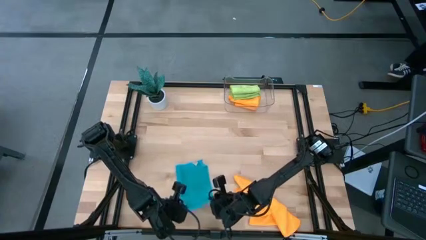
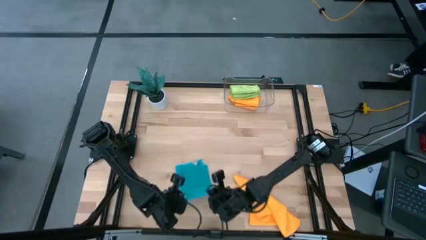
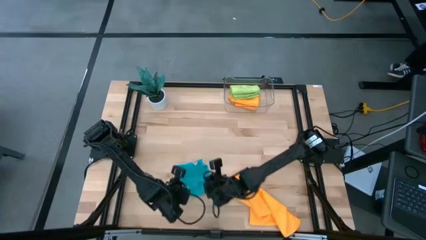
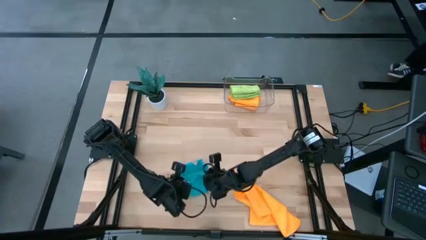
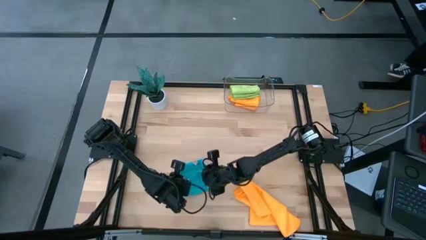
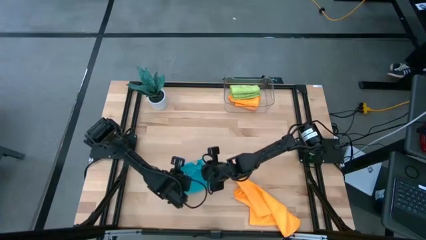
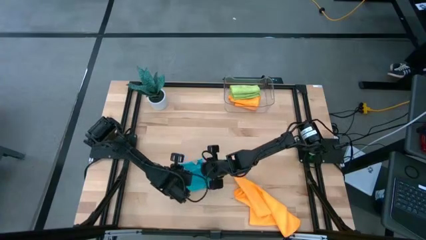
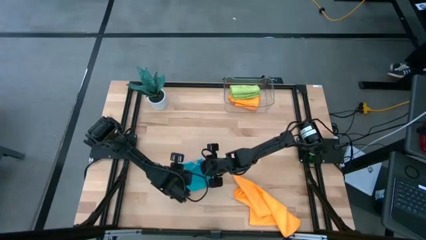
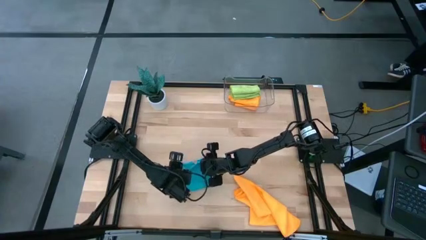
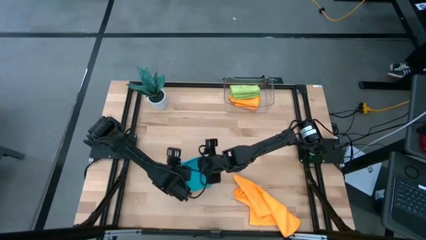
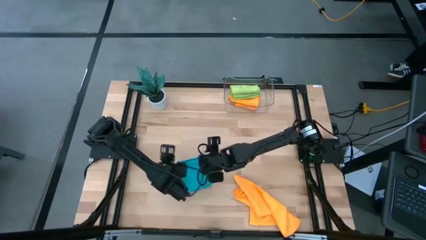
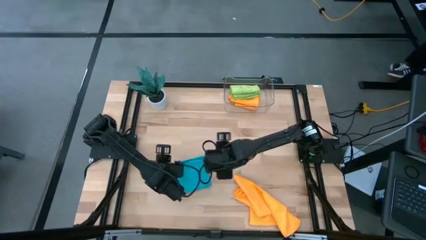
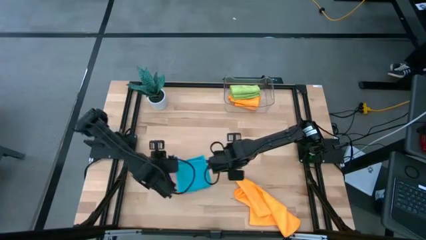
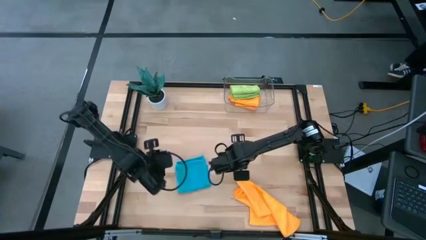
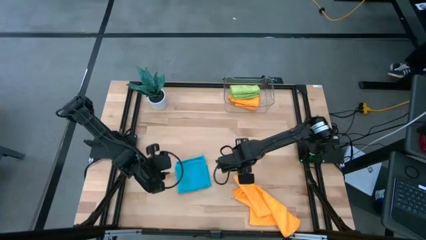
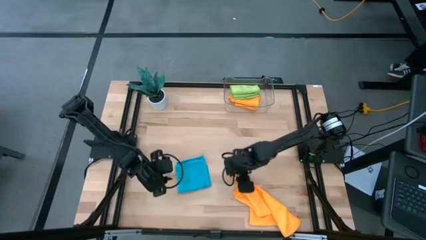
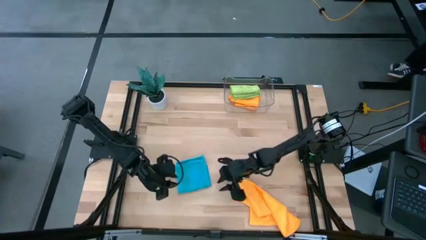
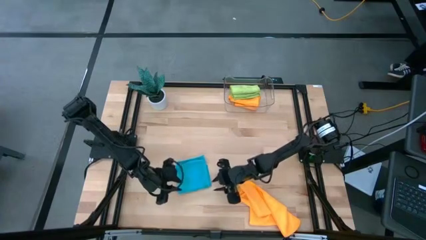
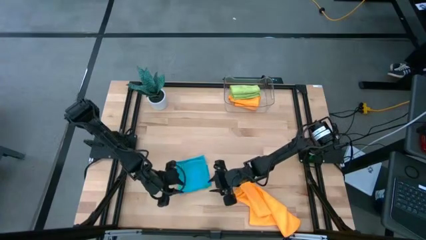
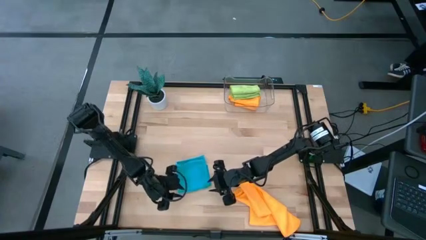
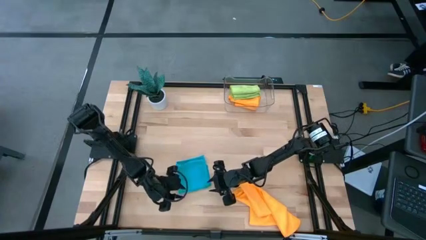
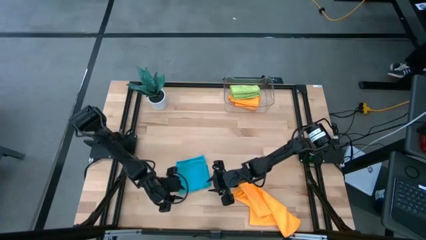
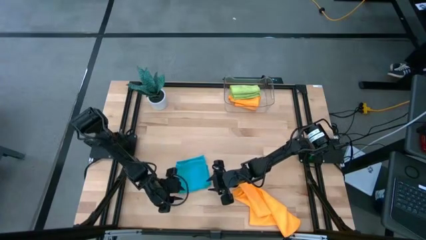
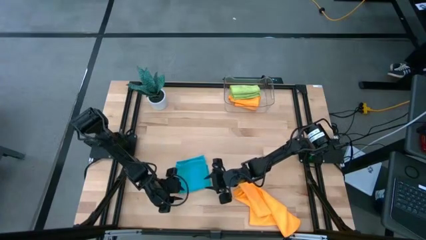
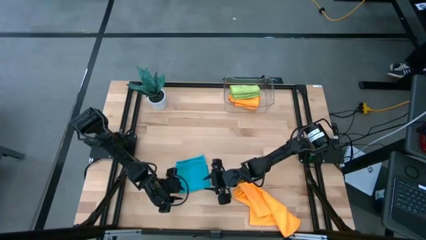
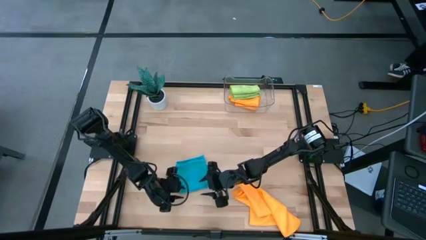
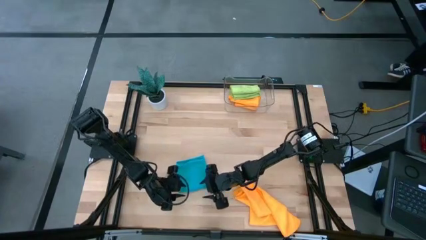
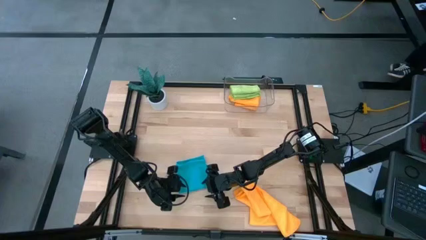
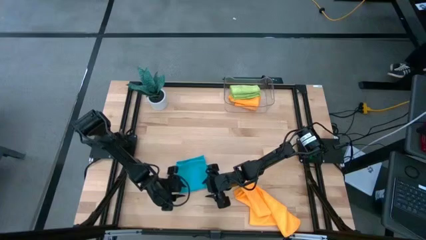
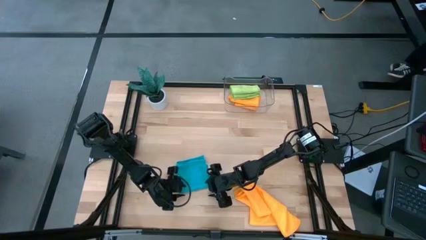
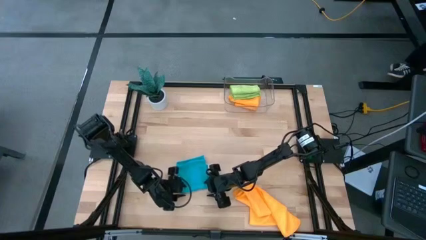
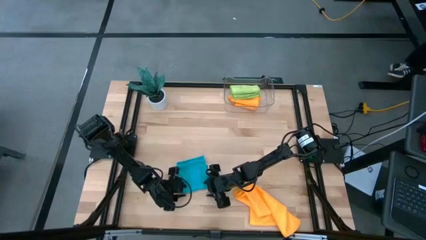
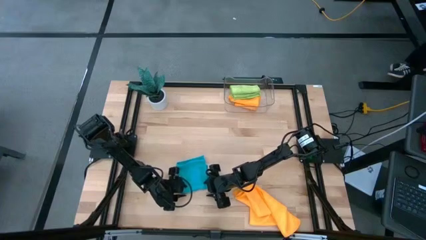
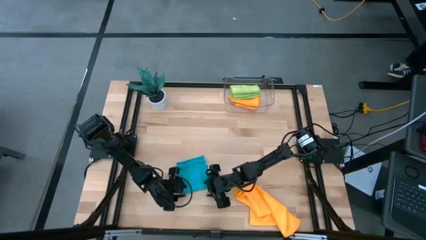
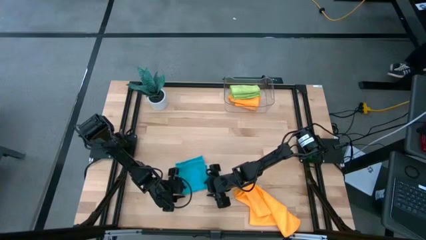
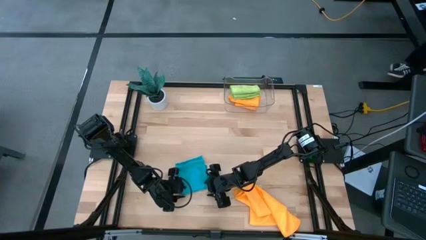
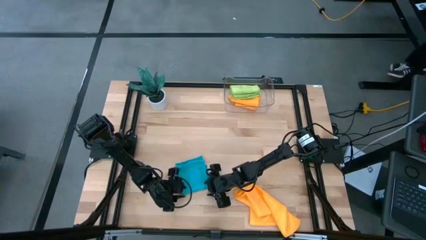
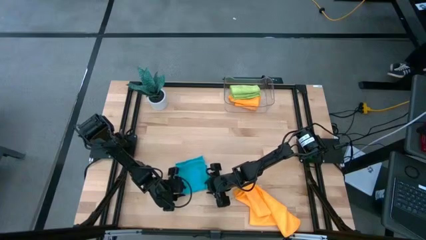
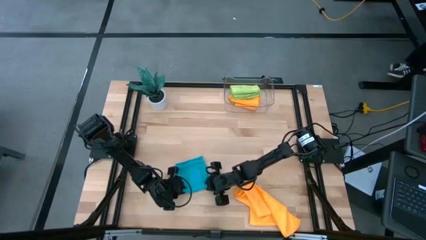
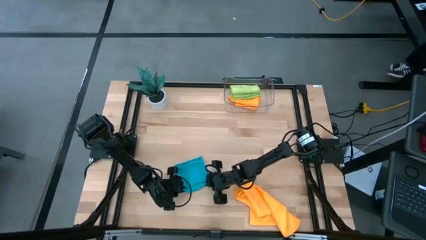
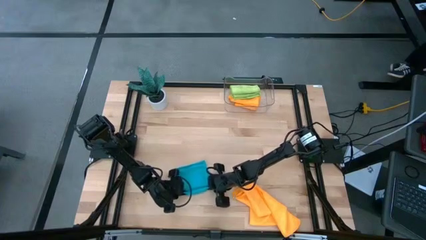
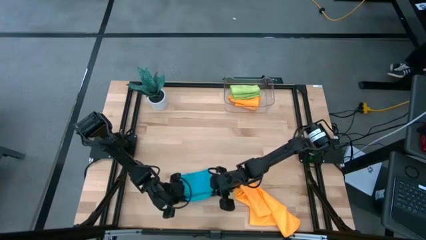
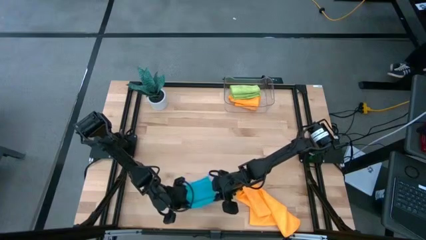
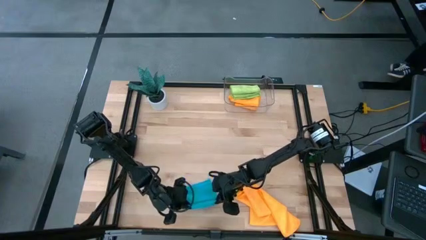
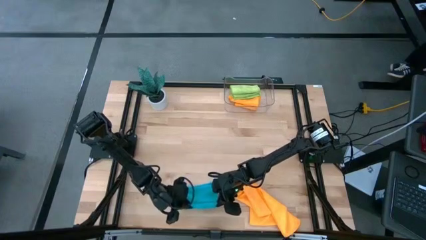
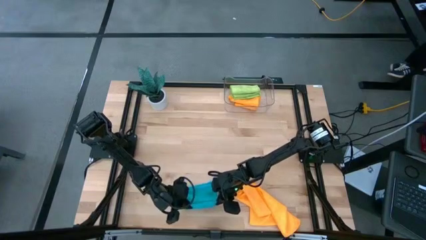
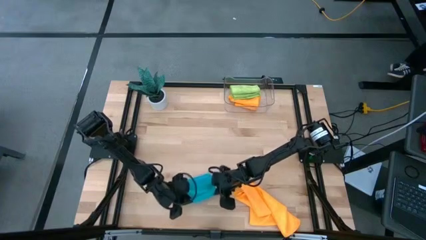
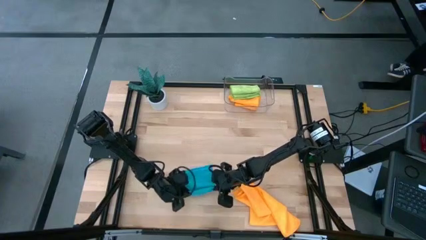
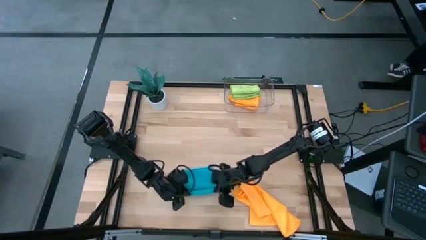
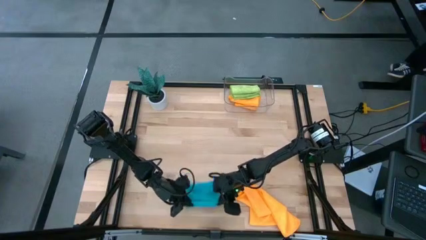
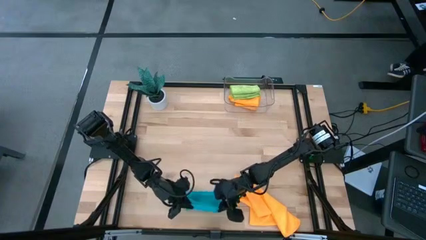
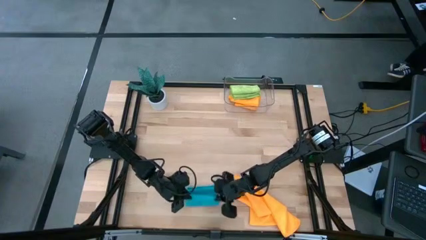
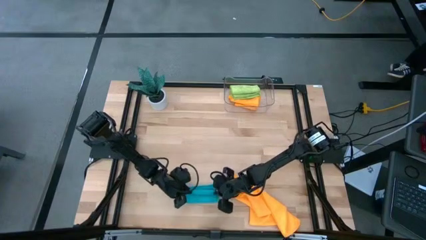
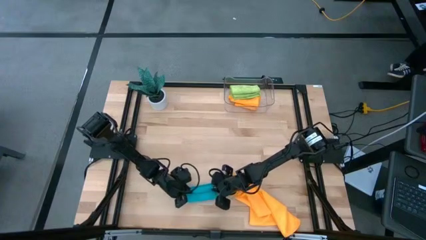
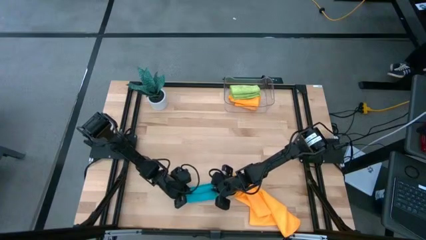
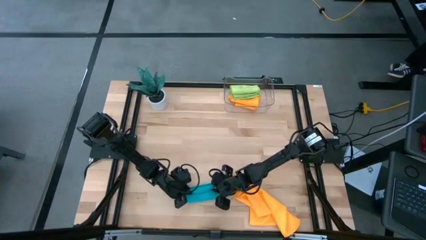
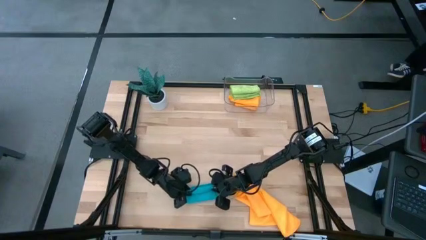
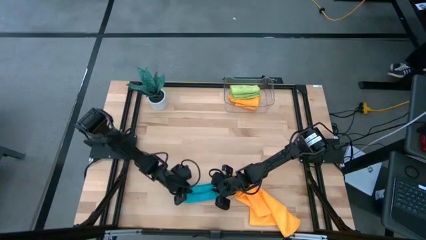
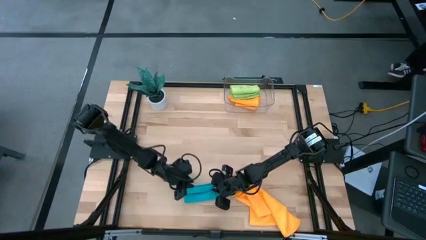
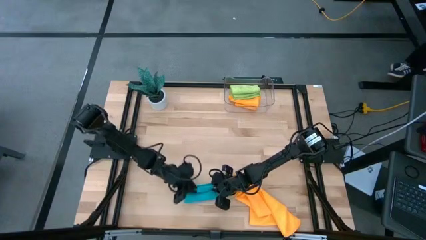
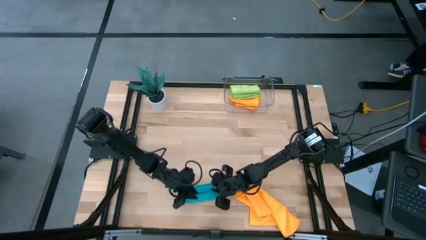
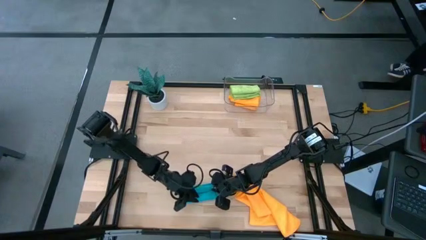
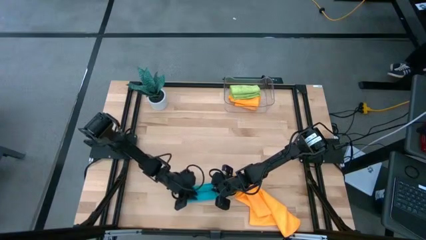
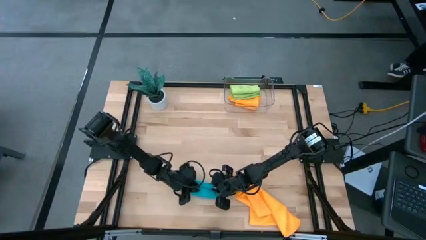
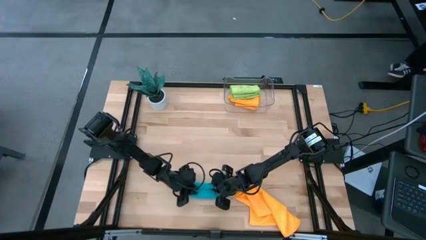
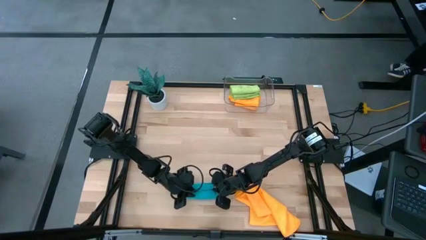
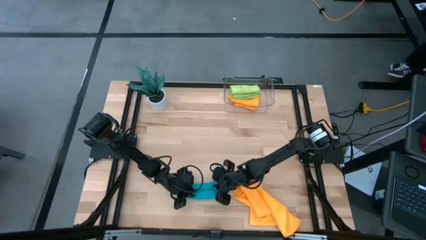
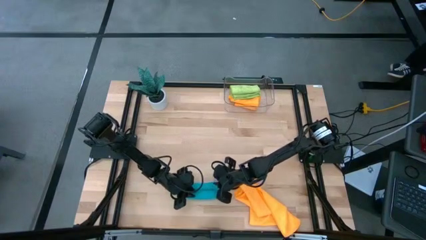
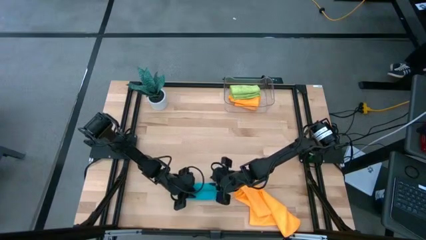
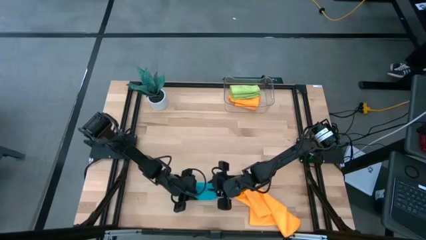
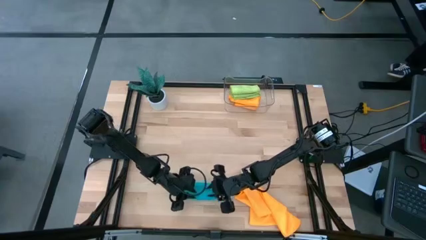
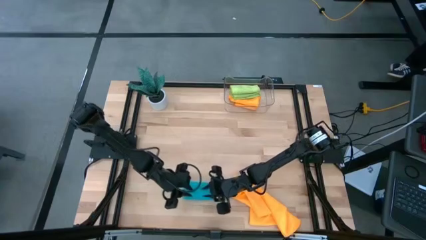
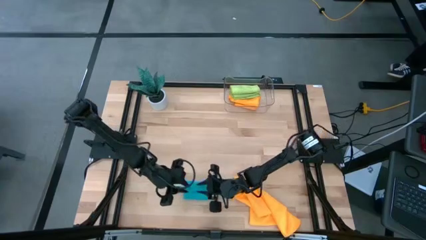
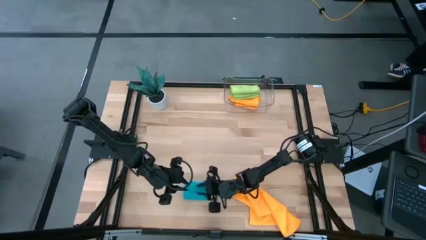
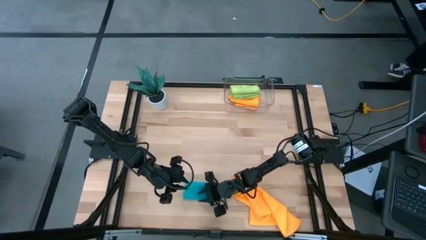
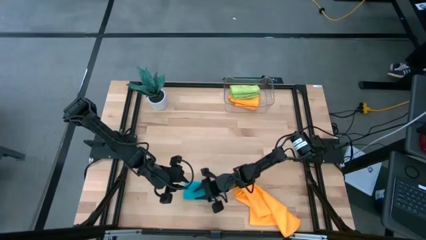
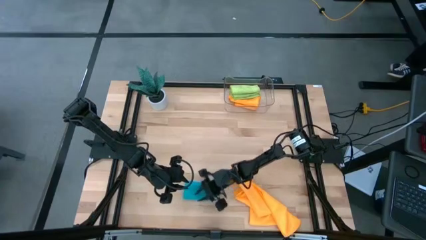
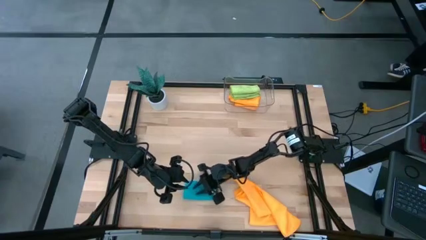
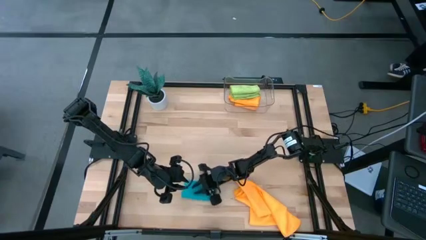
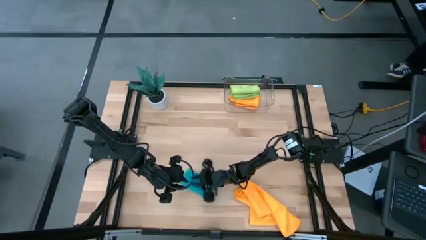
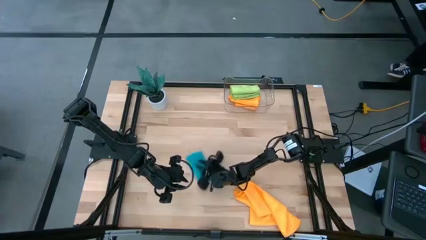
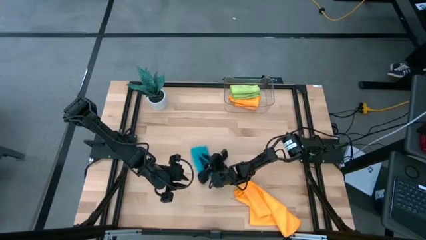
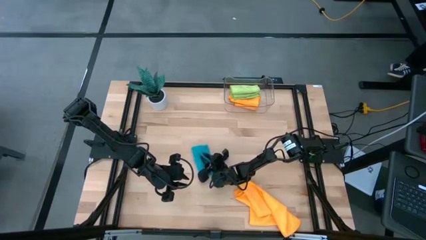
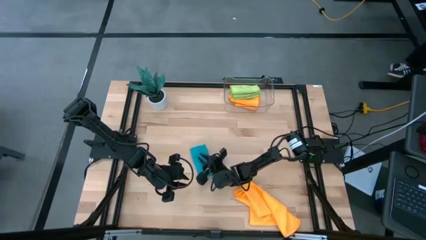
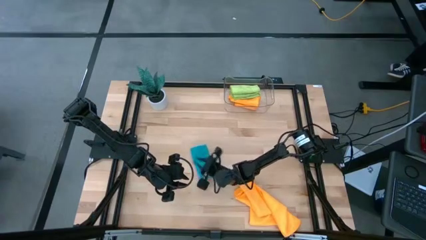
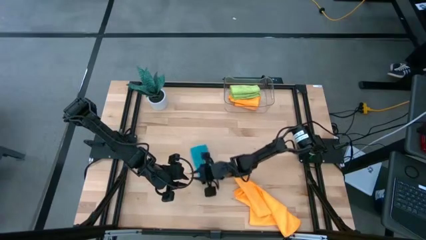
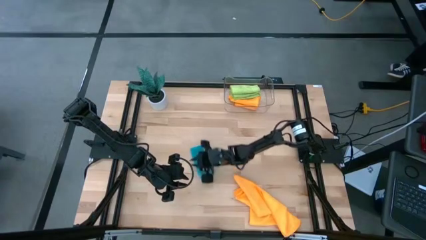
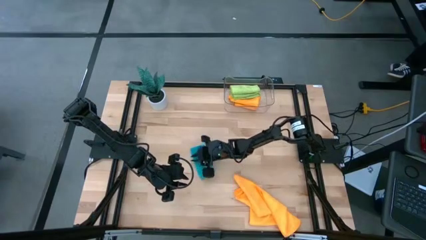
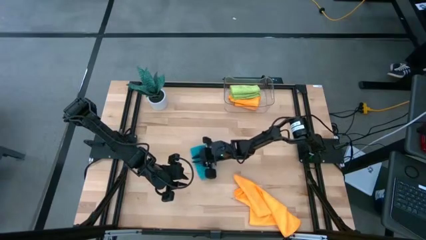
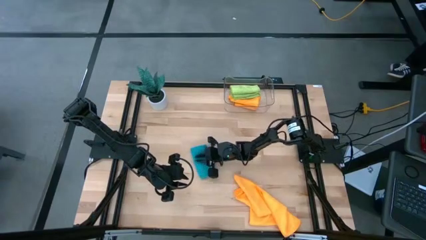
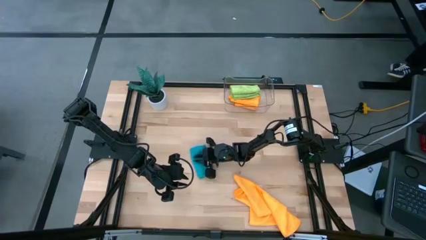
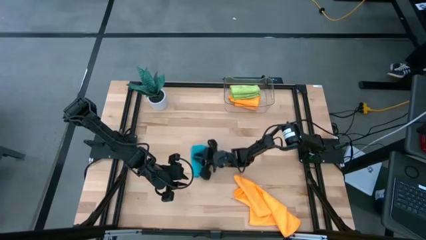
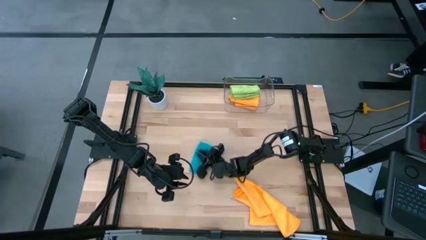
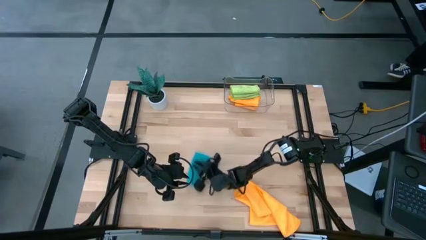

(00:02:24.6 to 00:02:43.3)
Task: Fold microfiber towels
Fold the blue microfiber towel
